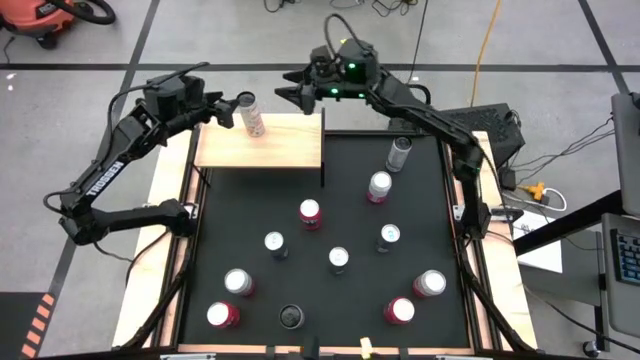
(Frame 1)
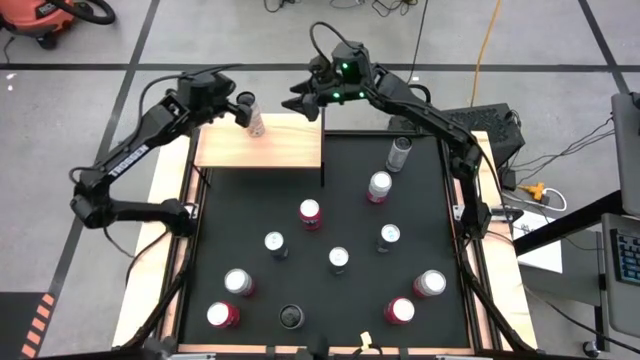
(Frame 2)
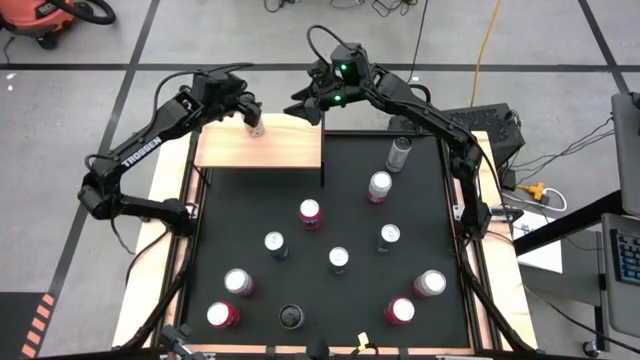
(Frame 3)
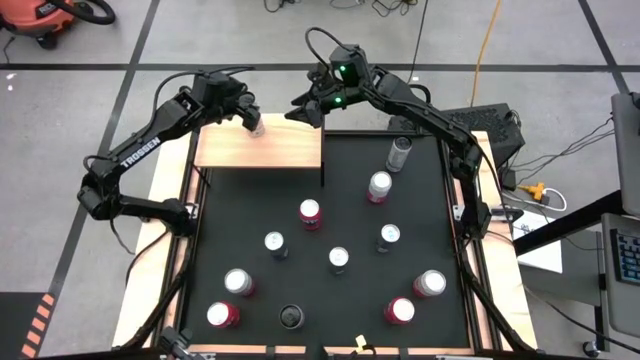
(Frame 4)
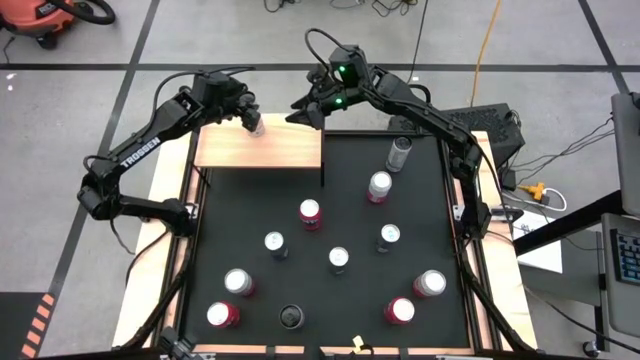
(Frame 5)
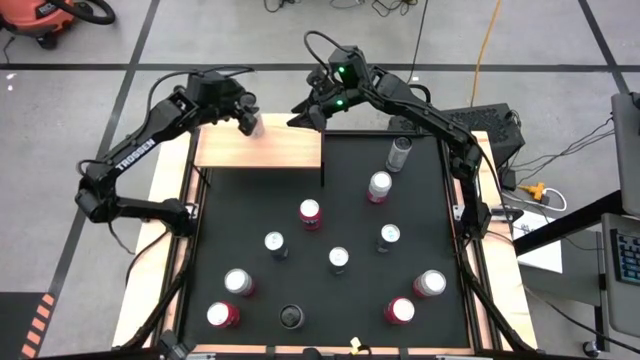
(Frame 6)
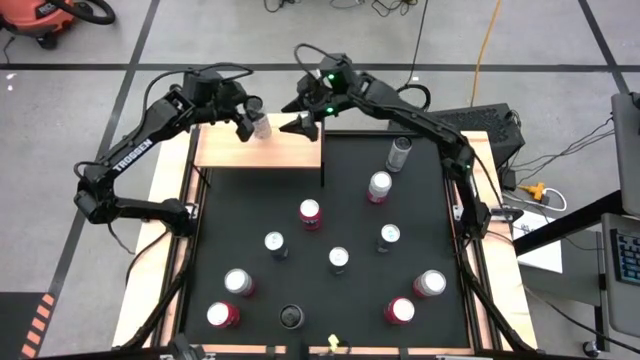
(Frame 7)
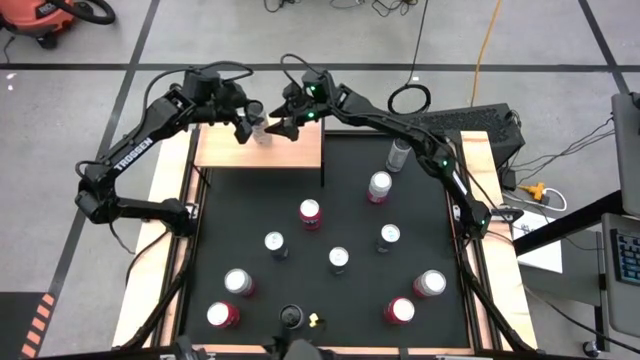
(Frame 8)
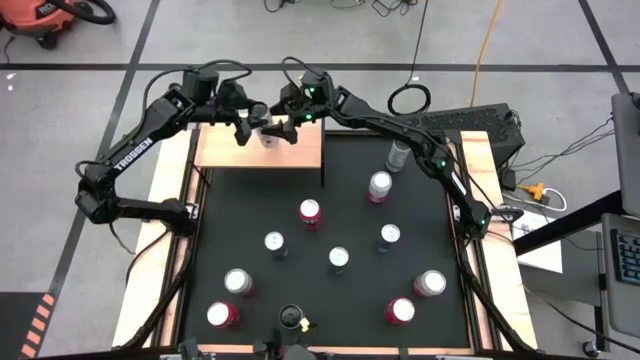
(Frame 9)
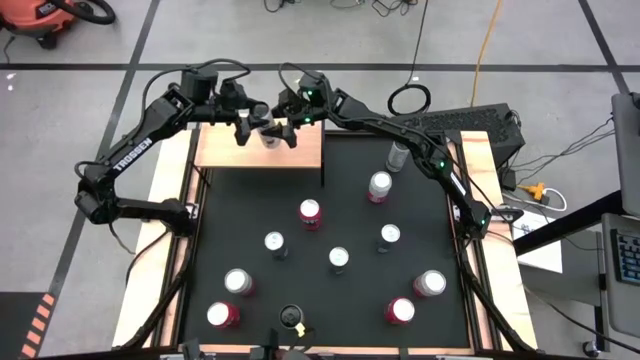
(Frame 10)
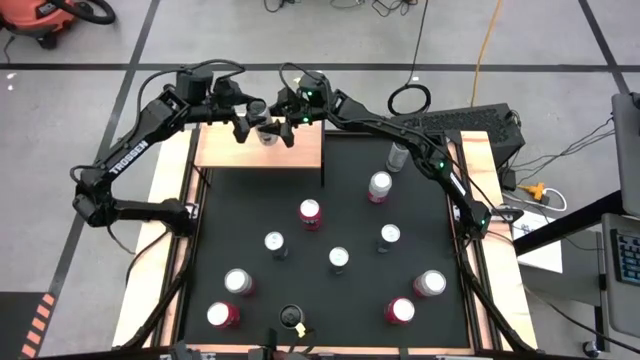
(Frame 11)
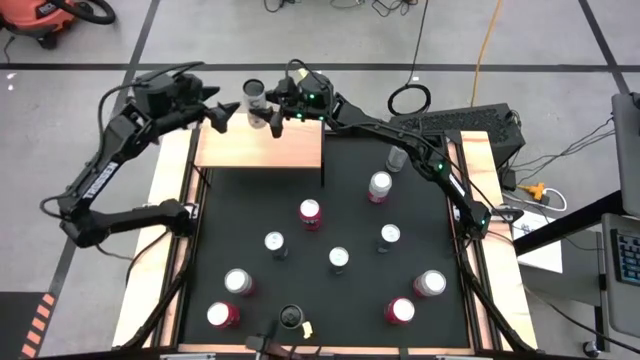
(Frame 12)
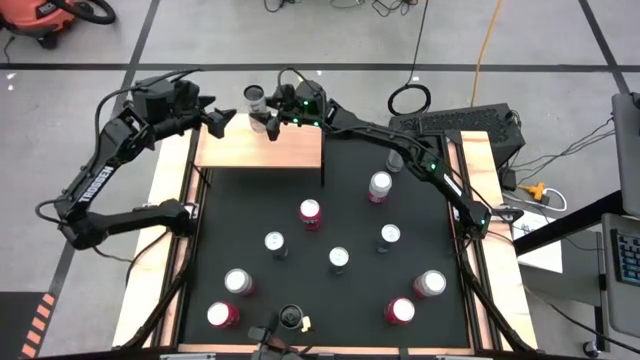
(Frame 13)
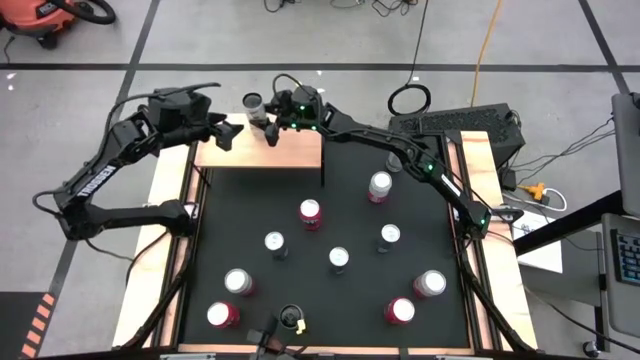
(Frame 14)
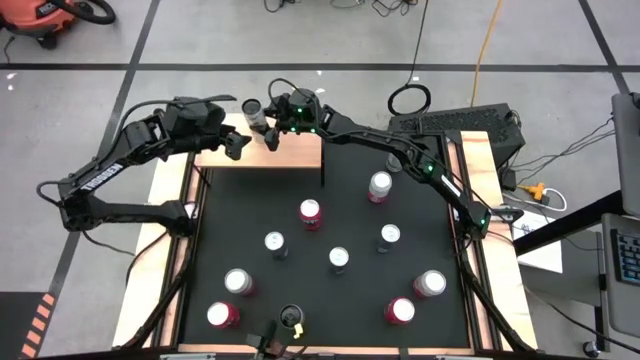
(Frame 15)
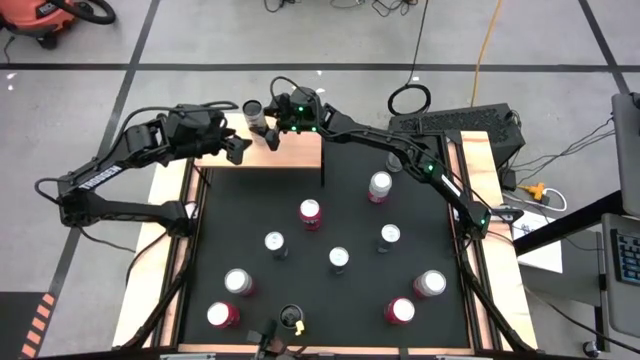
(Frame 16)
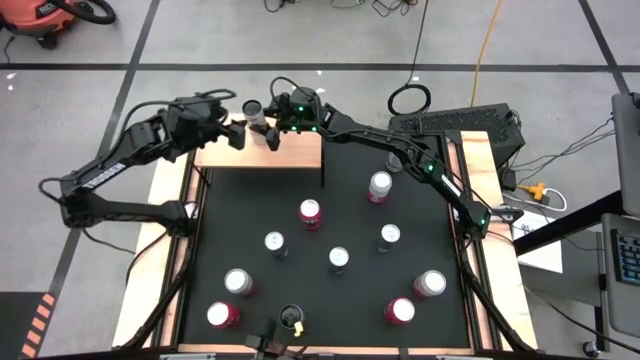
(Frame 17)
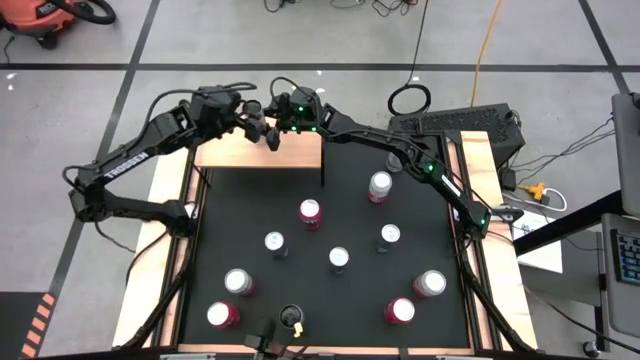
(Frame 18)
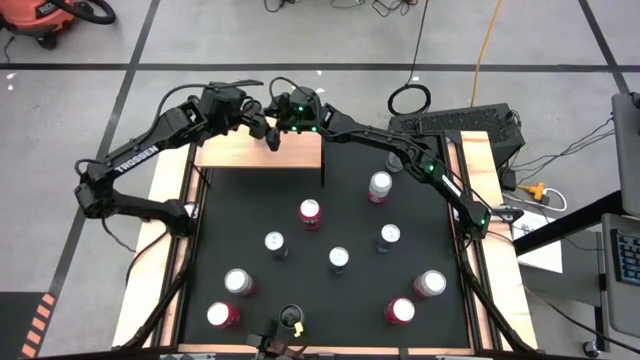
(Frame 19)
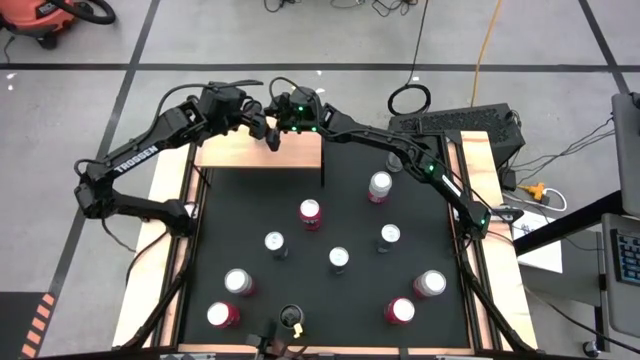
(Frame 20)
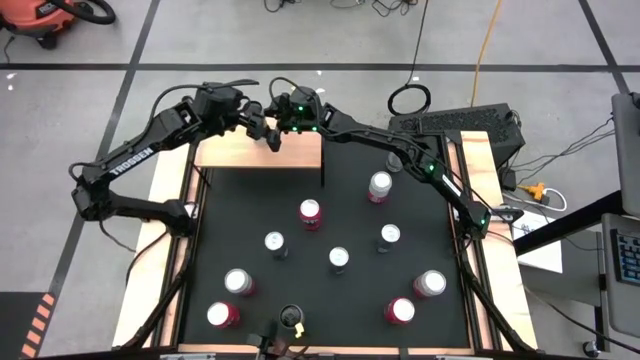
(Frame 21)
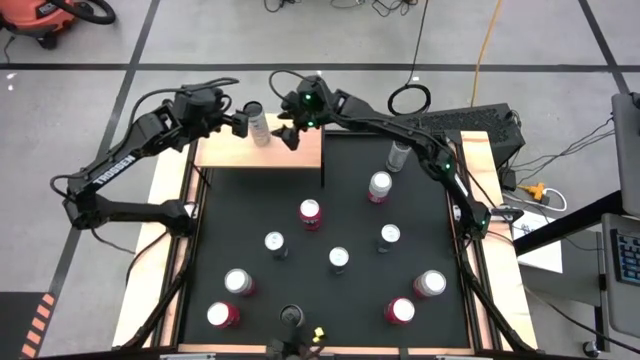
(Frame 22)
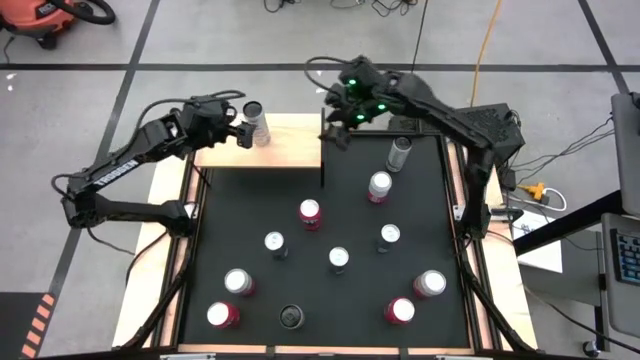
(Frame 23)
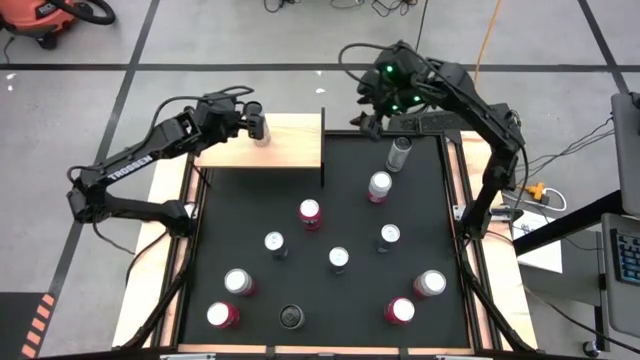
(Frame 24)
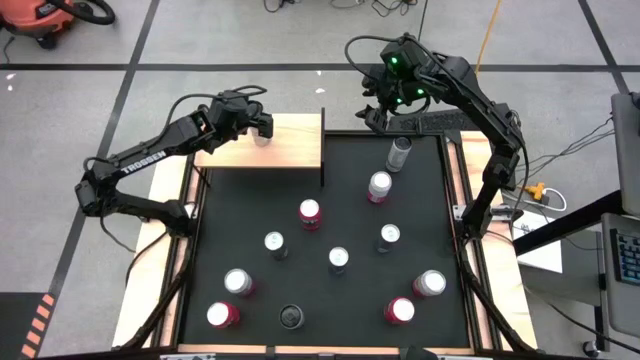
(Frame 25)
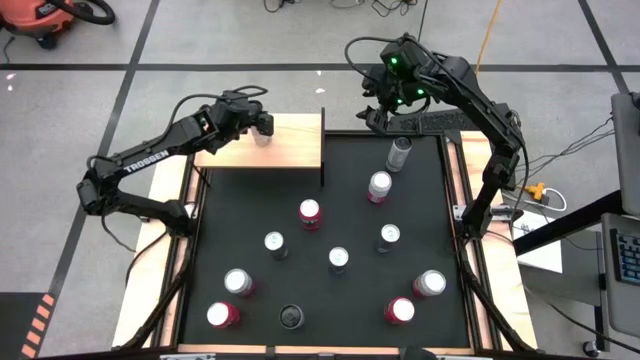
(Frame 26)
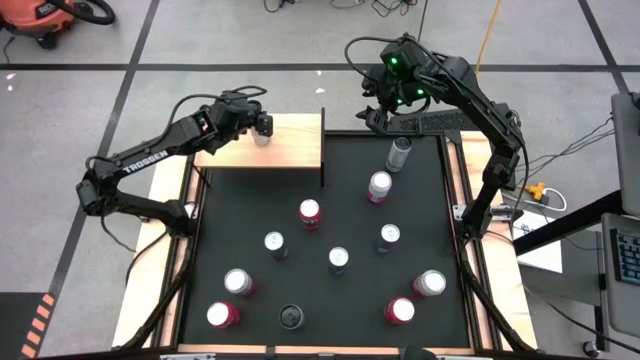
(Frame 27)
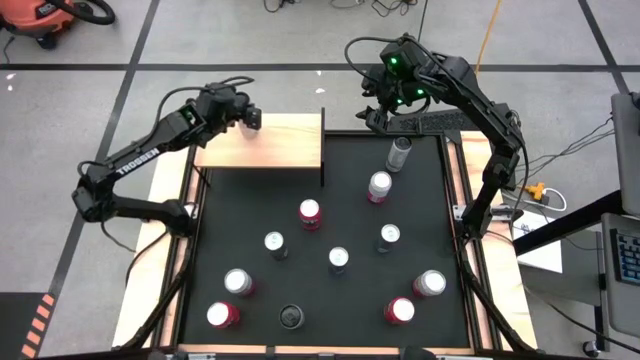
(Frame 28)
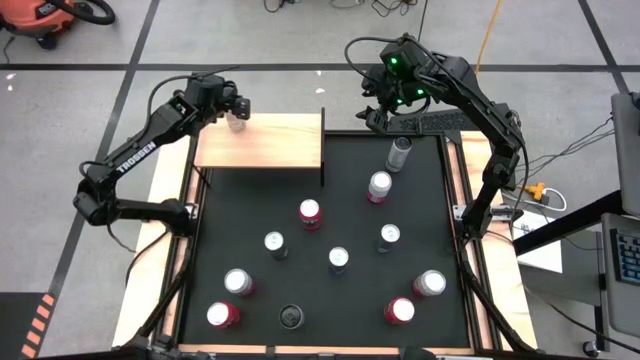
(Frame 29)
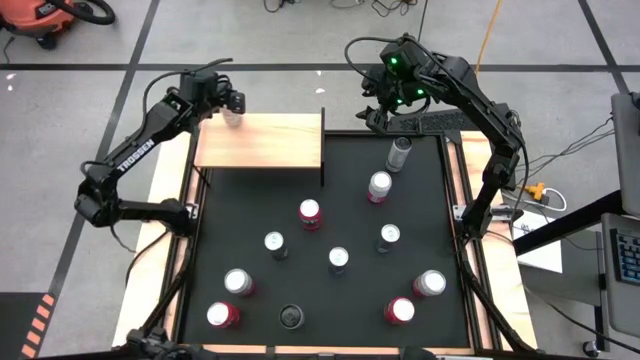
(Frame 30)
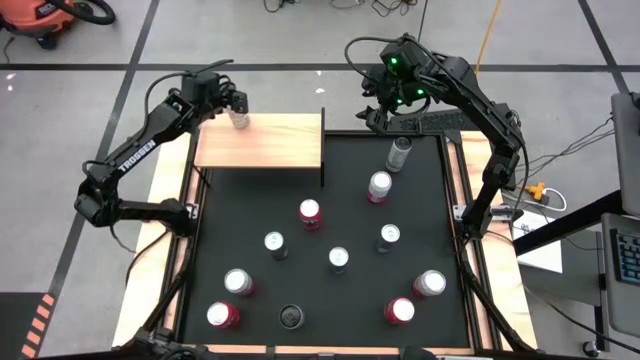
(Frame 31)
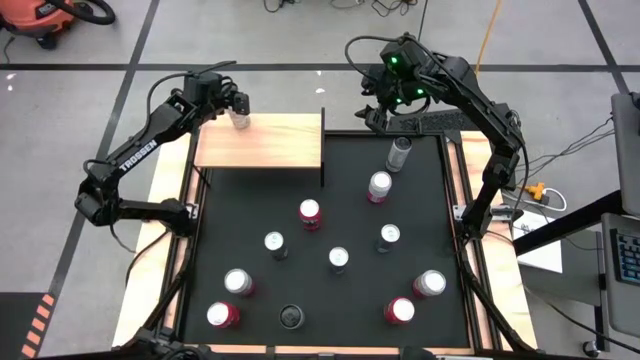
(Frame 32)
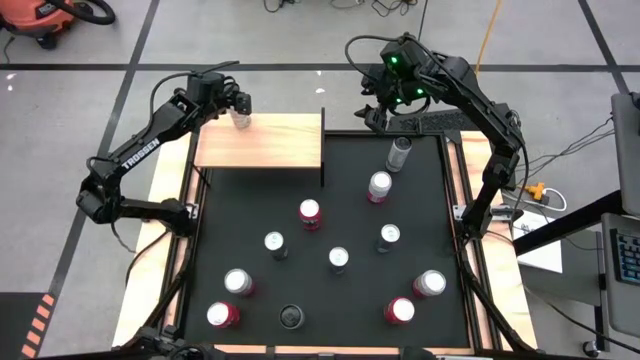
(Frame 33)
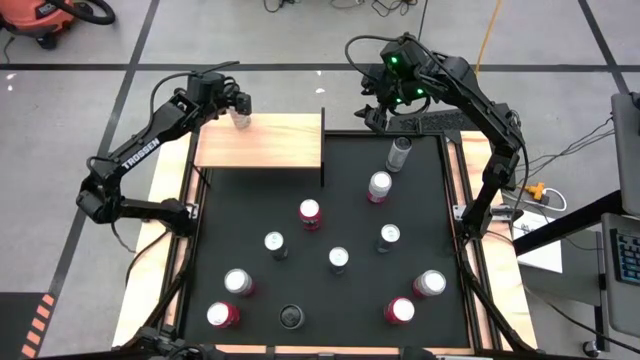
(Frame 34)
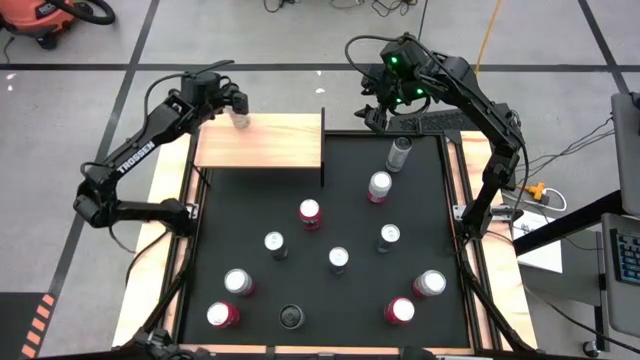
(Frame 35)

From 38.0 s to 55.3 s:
Task: Place canned beverage on shelf
Put the middle white yellow soda can on the shelf

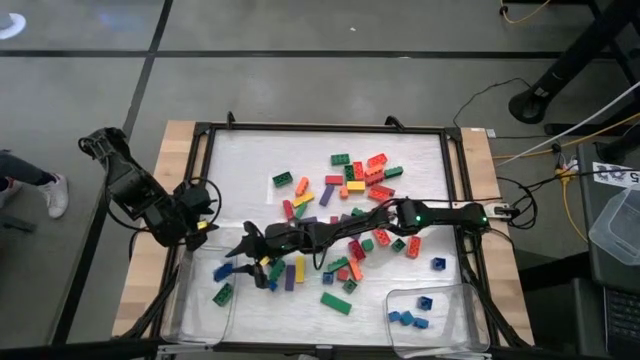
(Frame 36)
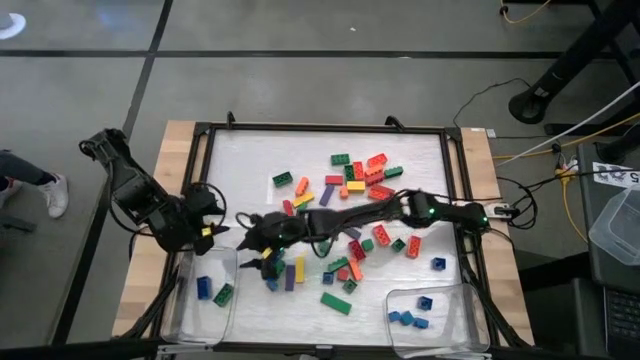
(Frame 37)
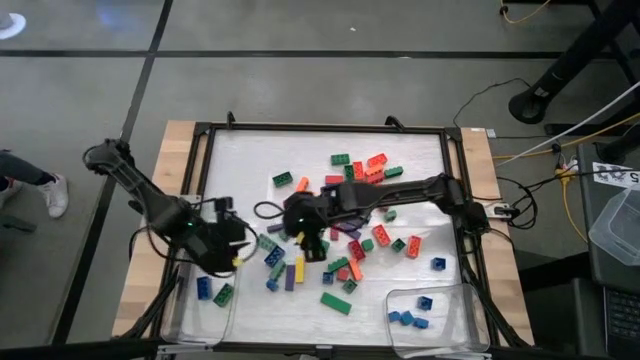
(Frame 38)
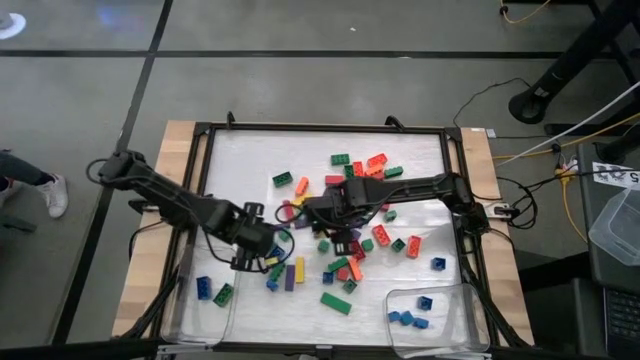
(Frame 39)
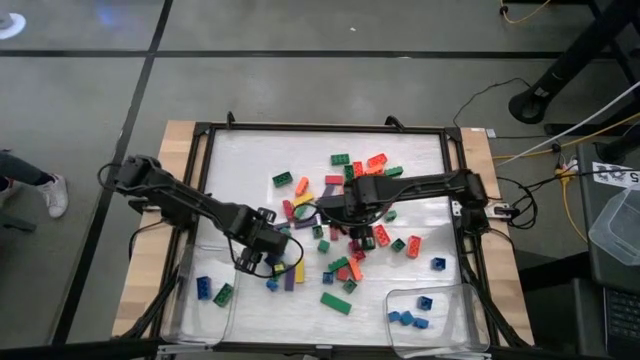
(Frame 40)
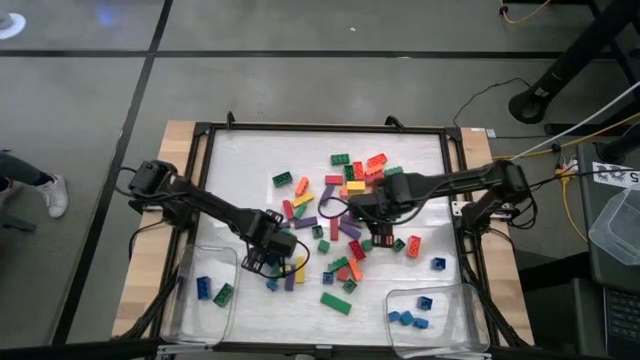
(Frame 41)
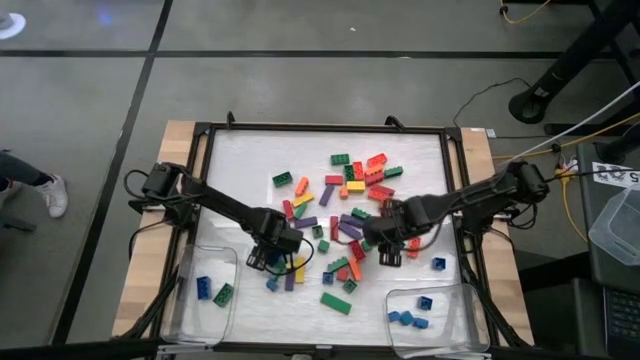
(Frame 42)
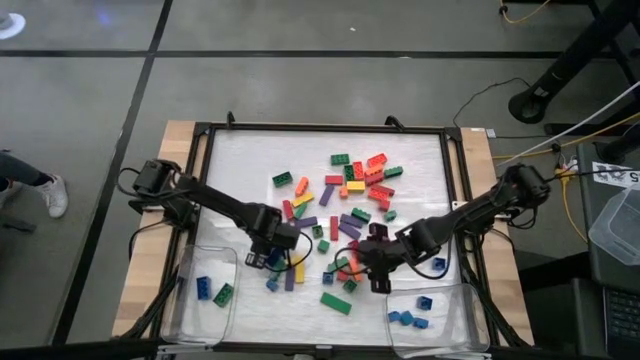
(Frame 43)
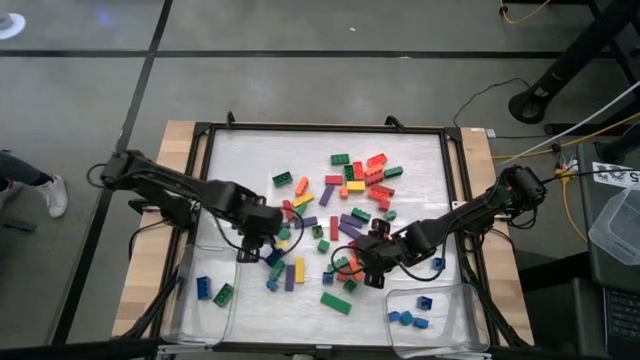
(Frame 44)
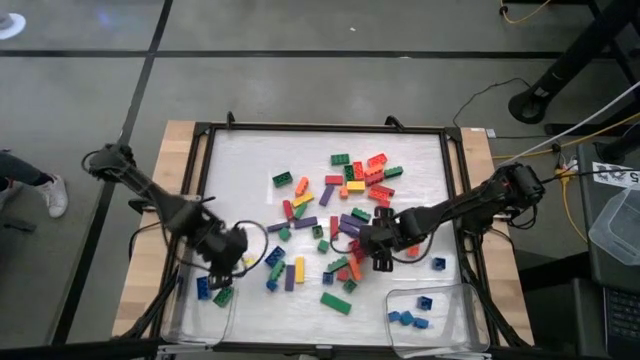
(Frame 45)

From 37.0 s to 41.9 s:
Task: Sort blocks by size
Put the large green game piece into the left transparent bin
